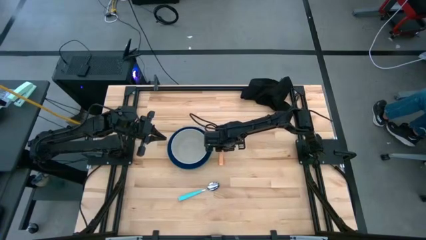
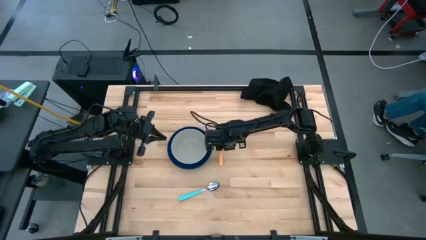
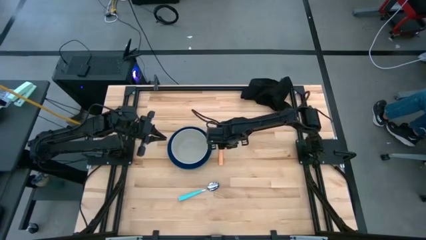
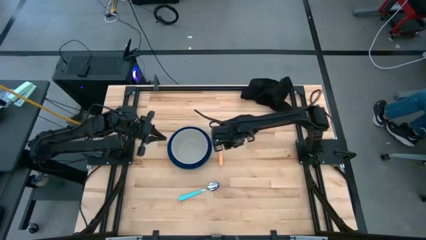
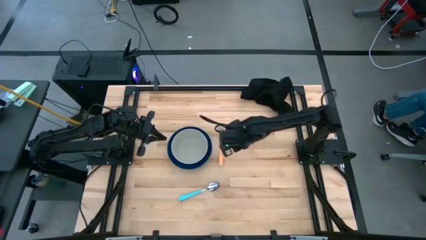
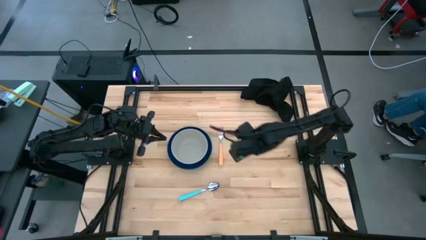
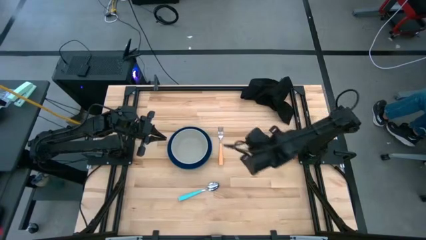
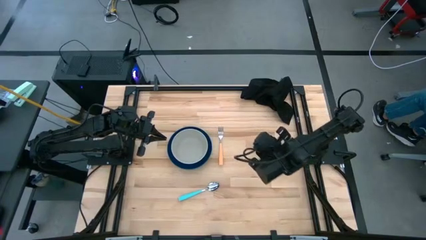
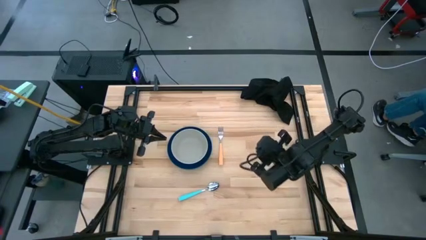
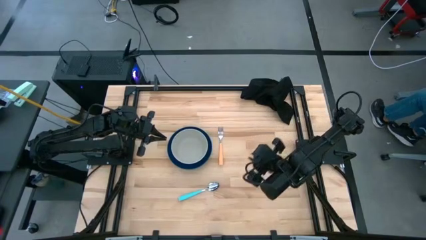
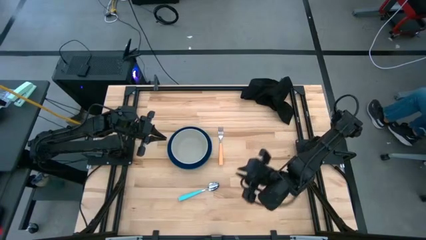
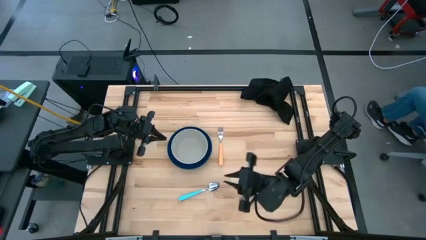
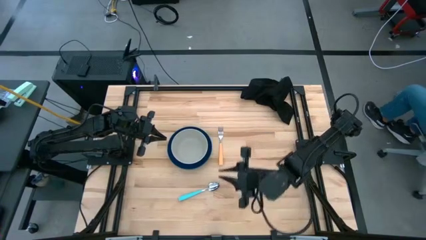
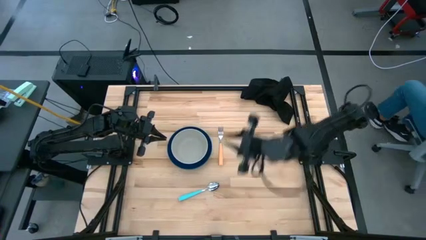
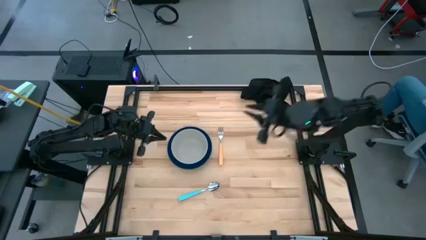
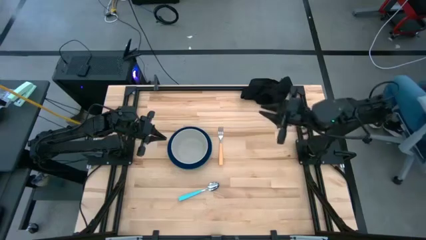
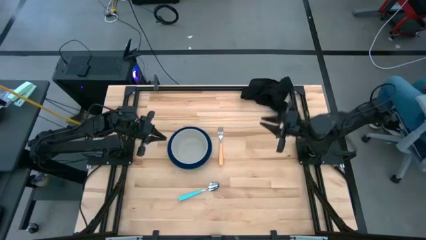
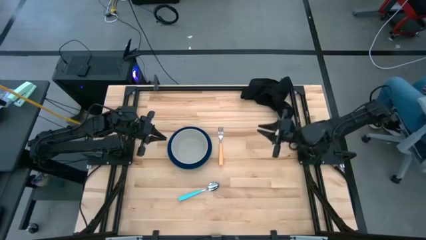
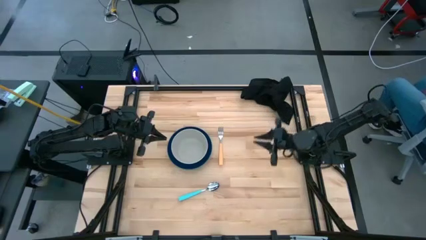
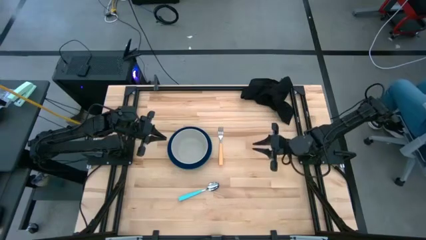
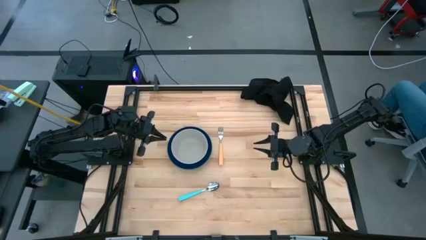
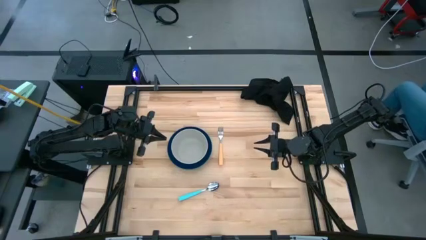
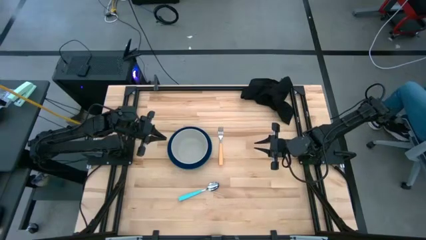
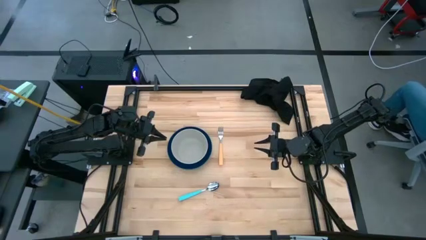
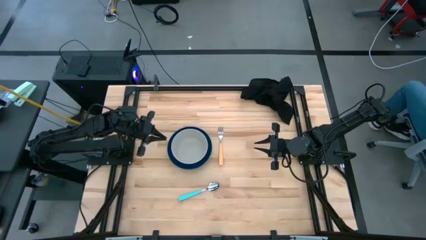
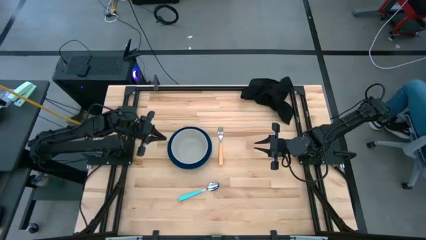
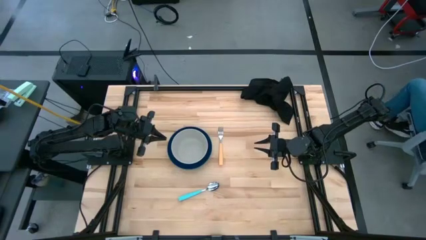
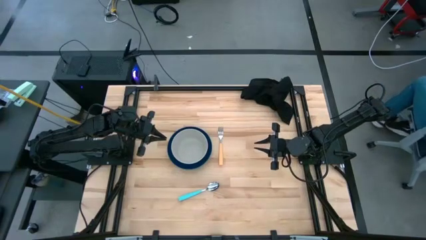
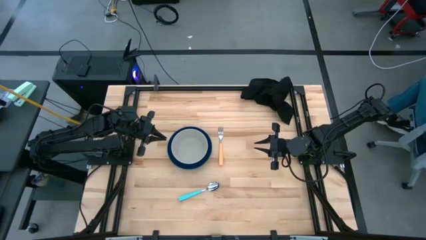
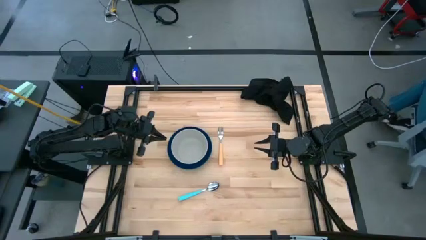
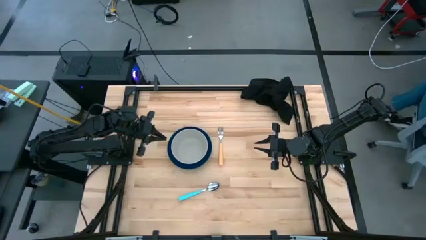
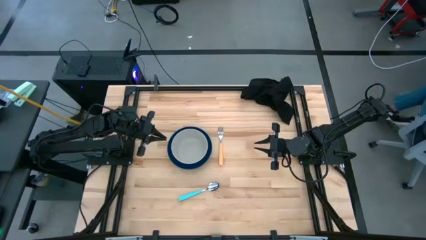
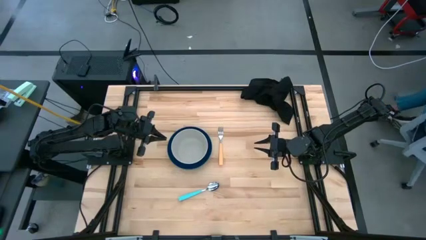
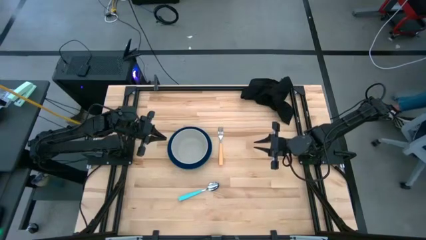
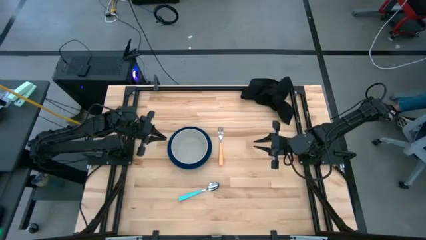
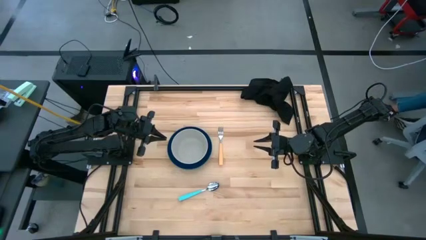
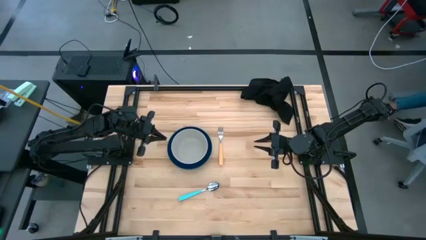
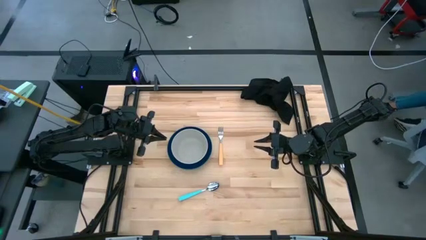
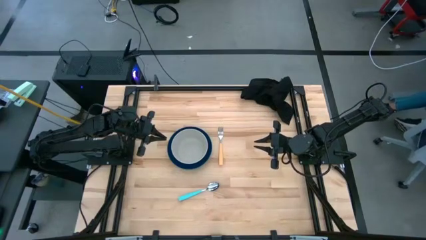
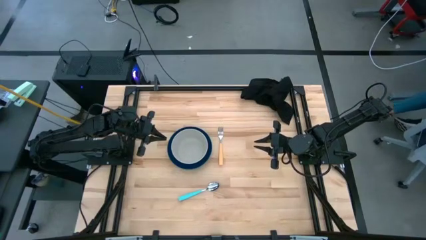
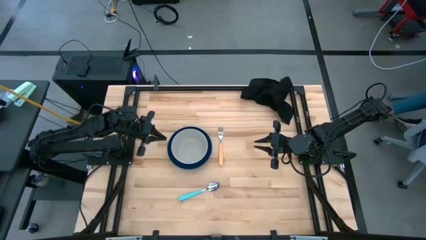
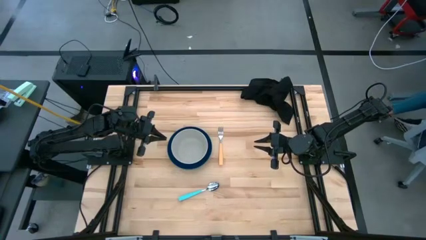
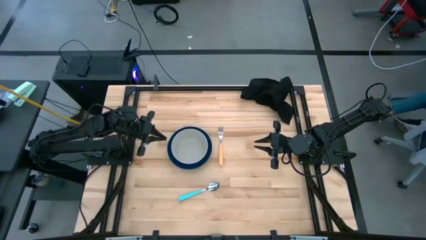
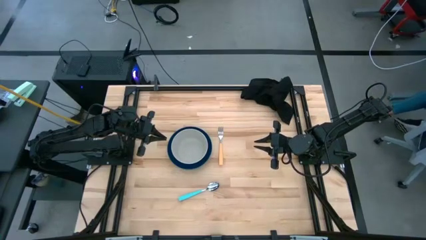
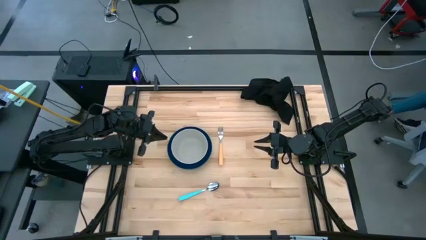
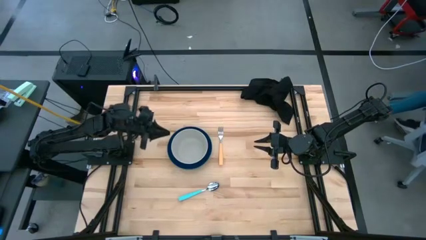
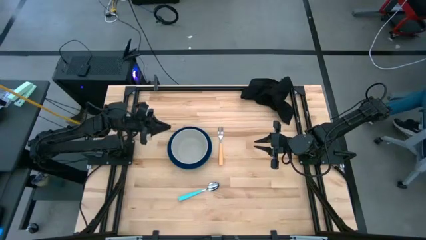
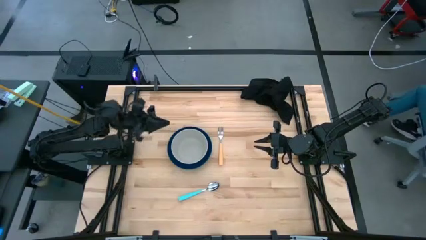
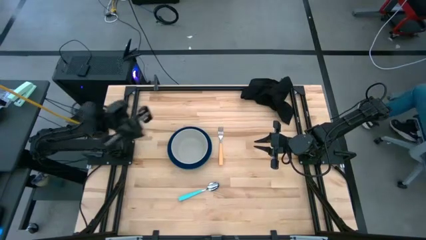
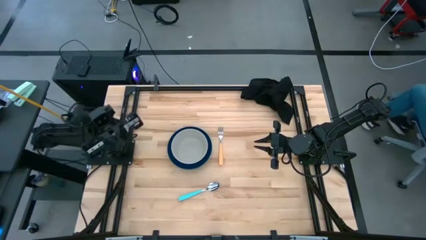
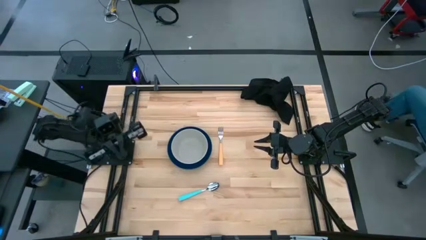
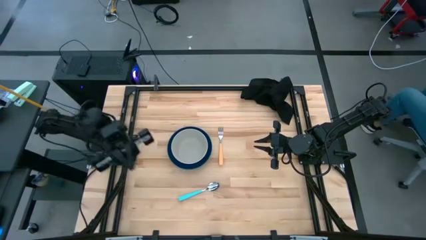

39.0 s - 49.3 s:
Task: Set table place
Put the blue spoon into the gray bowl on the table
